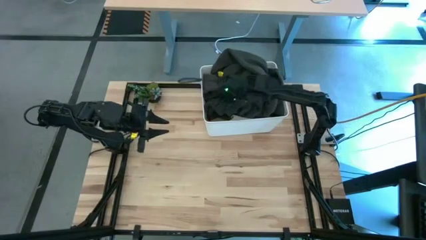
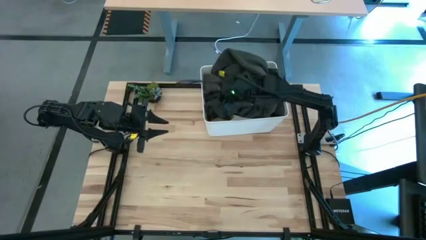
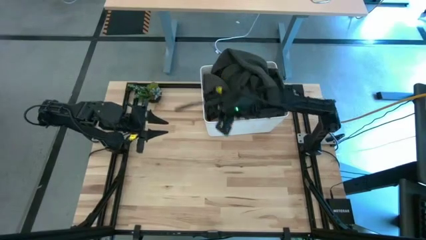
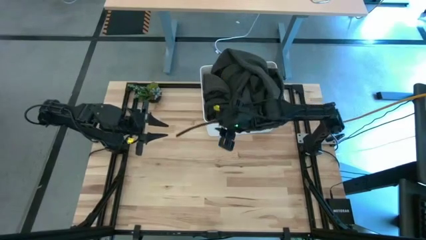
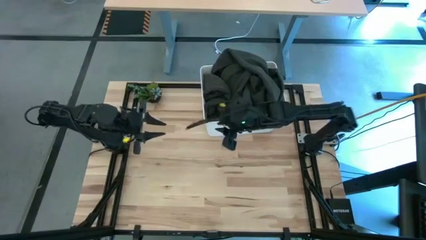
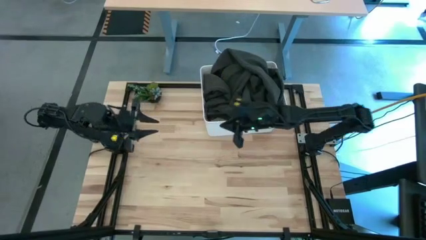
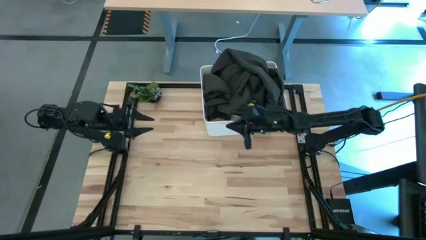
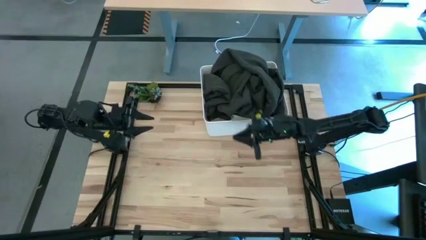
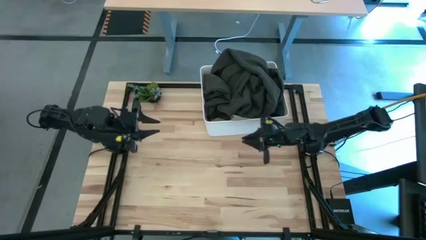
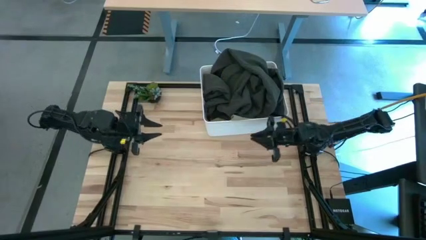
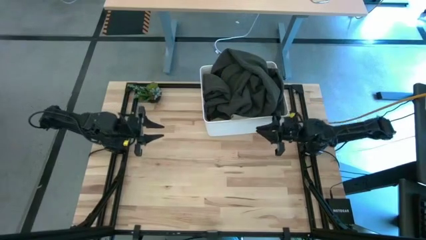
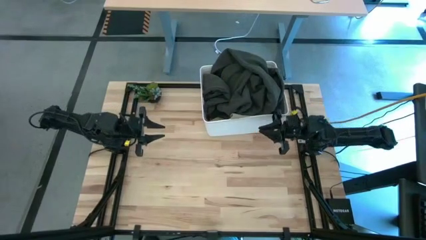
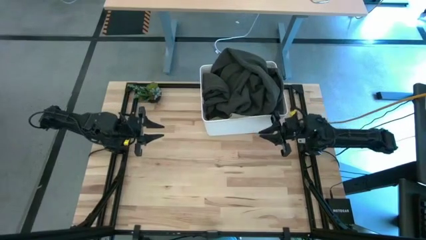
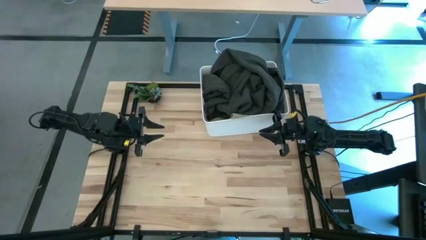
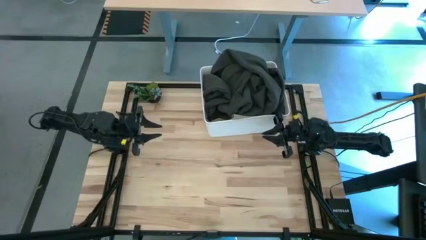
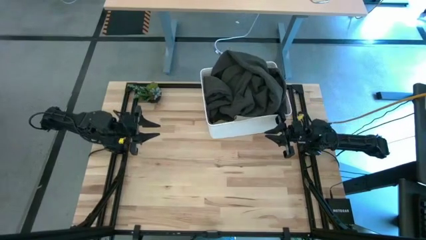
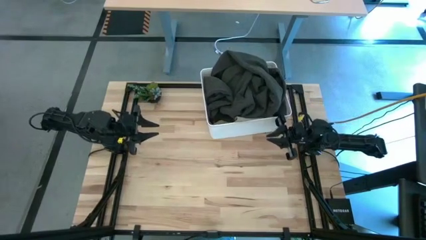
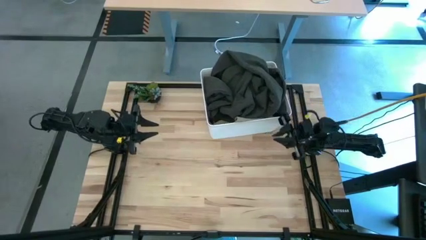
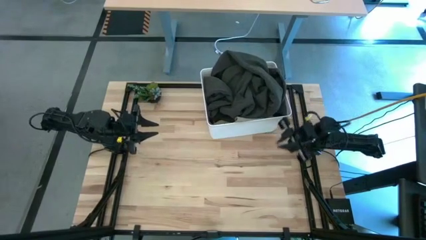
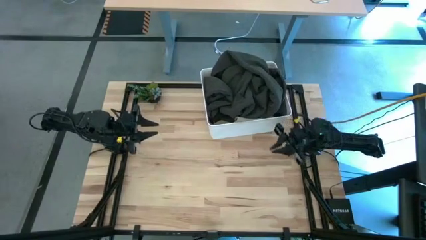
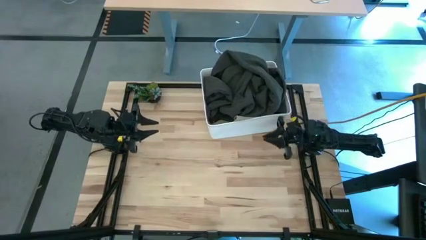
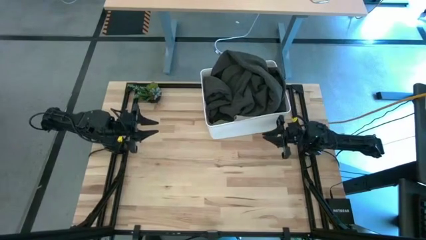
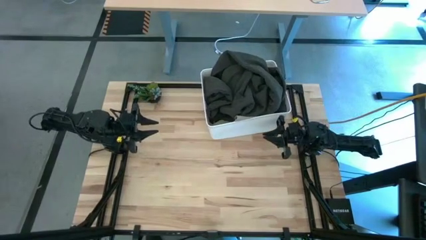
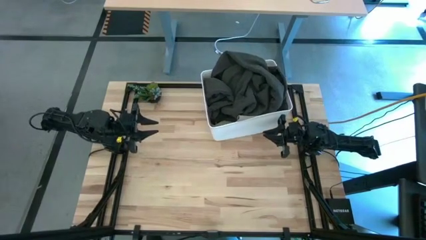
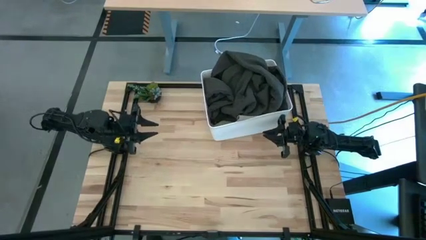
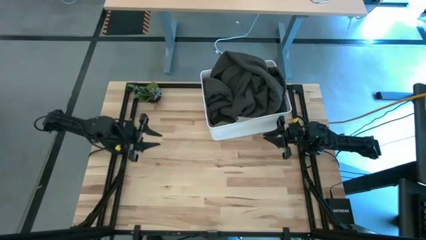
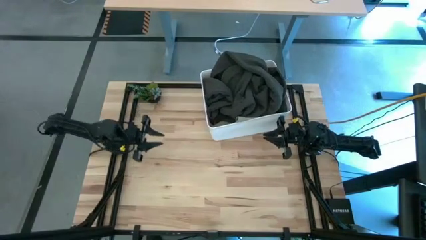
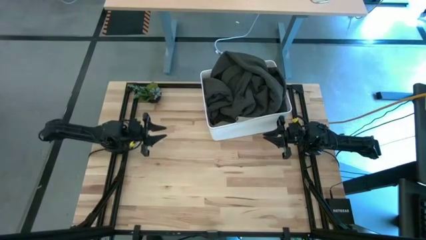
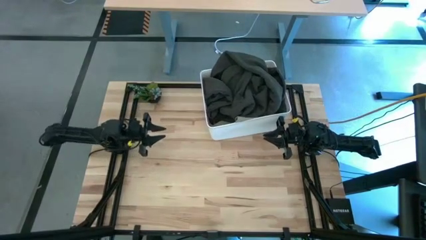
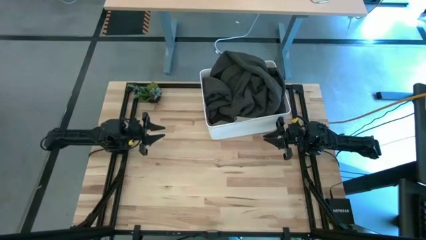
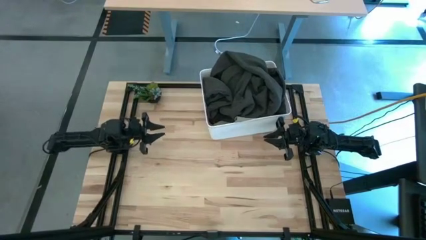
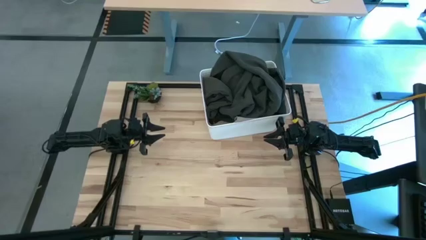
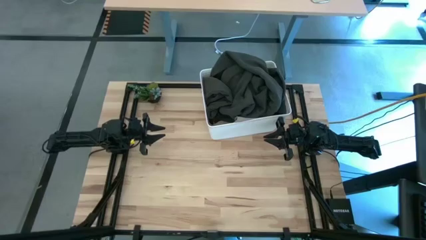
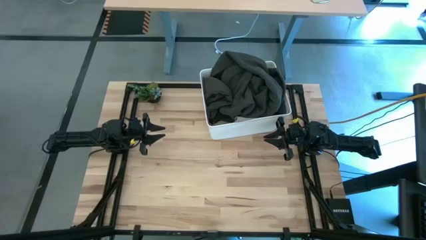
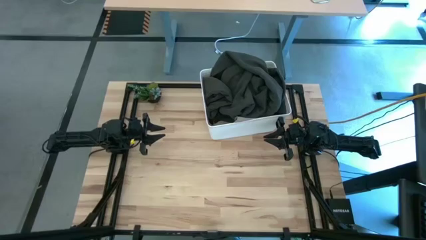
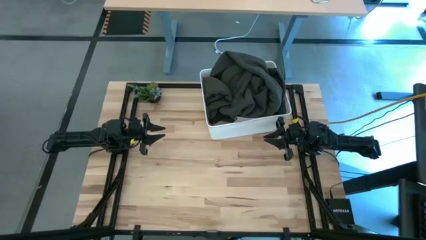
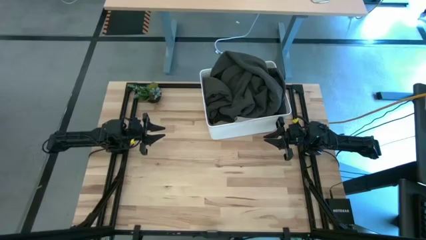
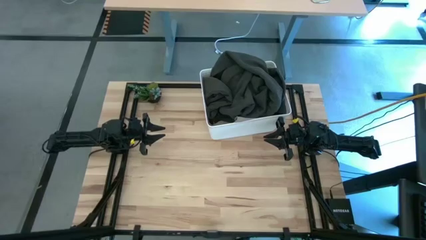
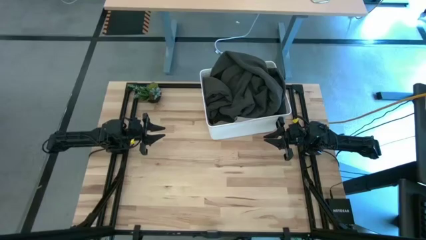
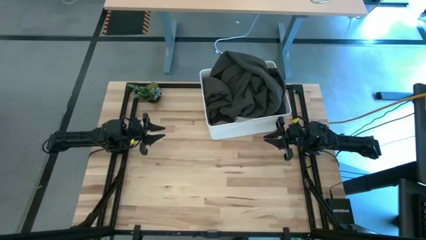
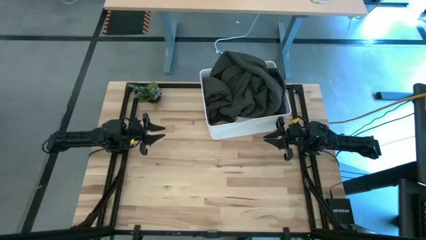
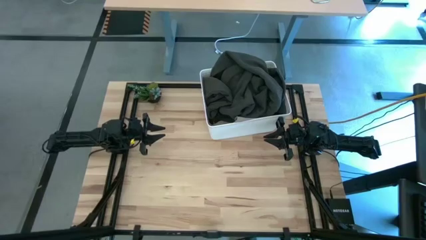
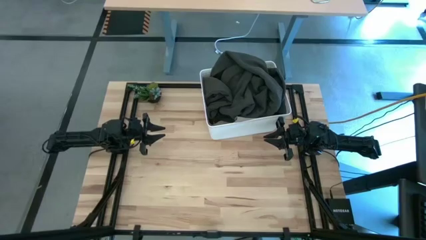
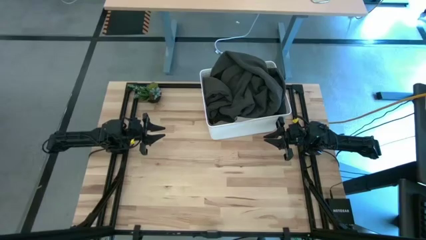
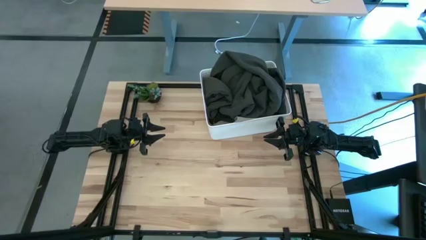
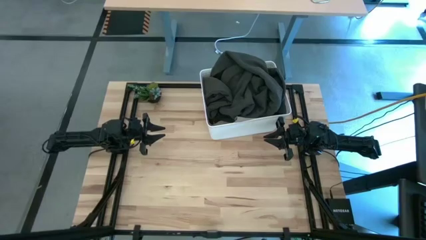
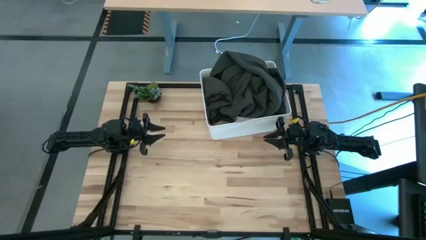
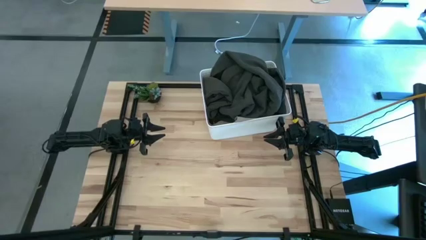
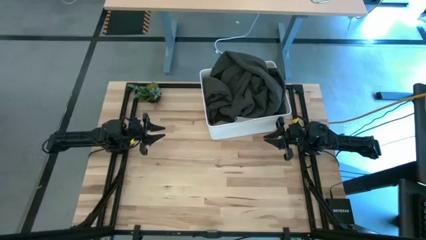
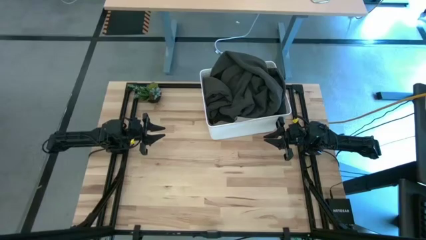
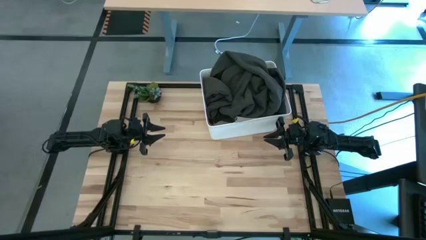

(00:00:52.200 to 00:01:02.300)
Task: Sort clothes
Return to Home Position
